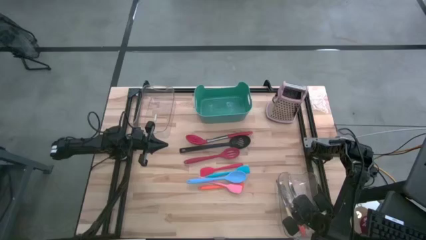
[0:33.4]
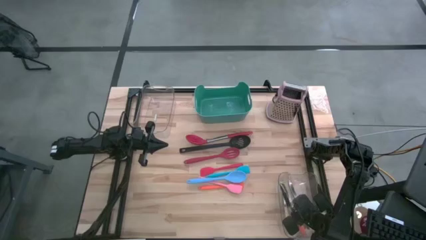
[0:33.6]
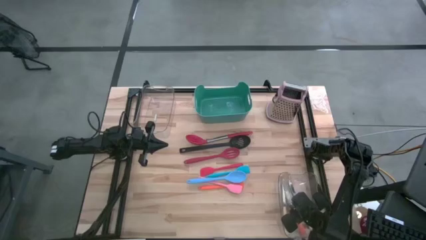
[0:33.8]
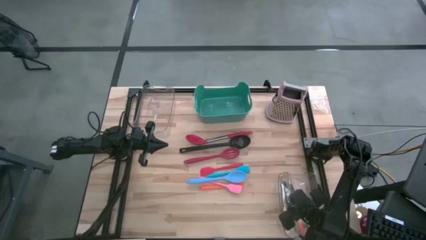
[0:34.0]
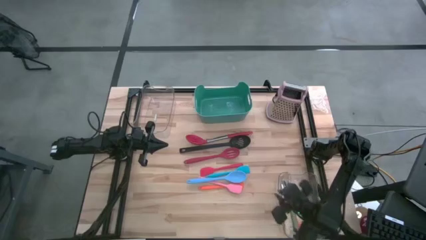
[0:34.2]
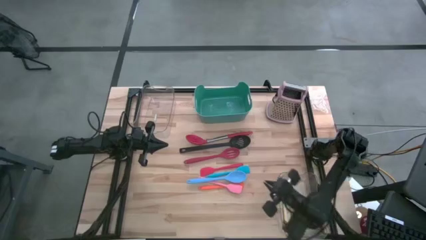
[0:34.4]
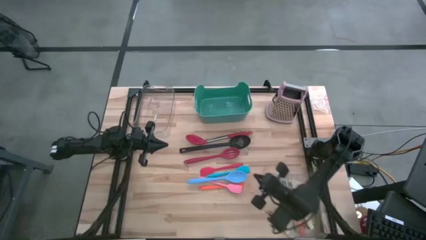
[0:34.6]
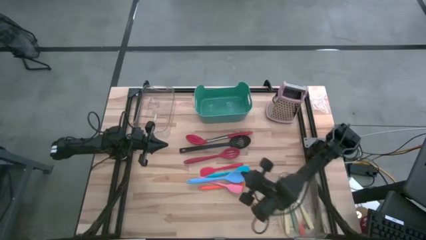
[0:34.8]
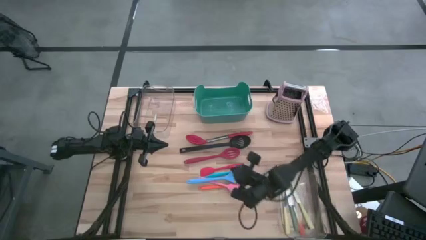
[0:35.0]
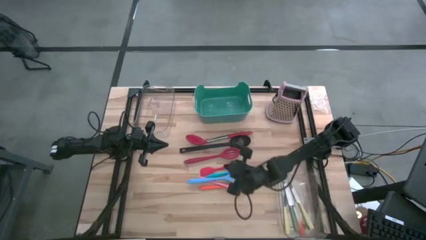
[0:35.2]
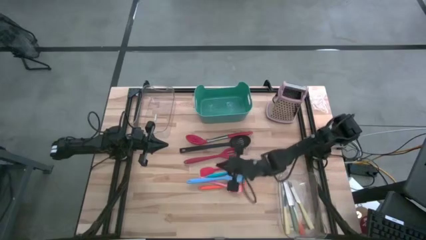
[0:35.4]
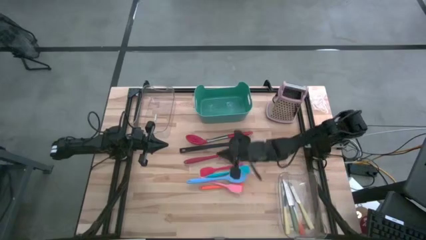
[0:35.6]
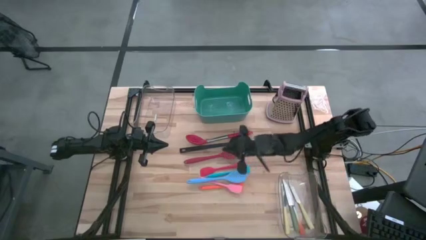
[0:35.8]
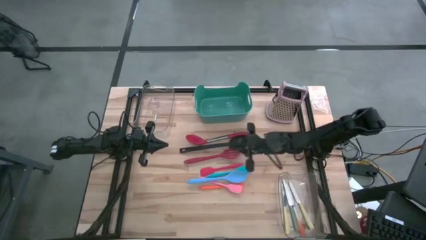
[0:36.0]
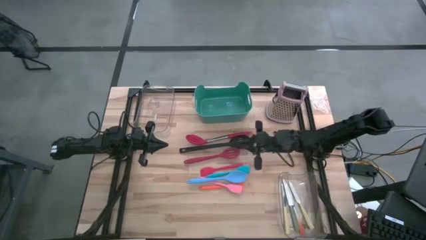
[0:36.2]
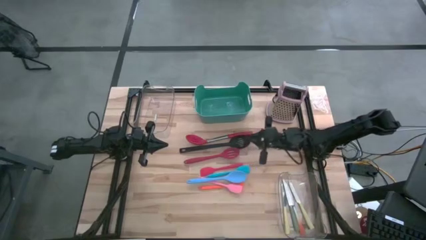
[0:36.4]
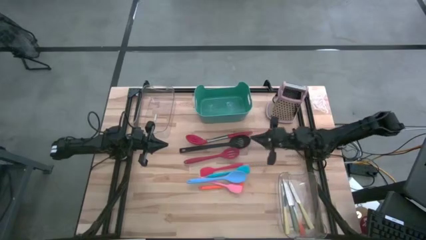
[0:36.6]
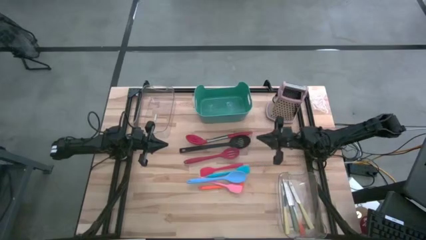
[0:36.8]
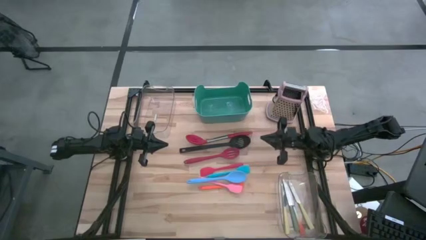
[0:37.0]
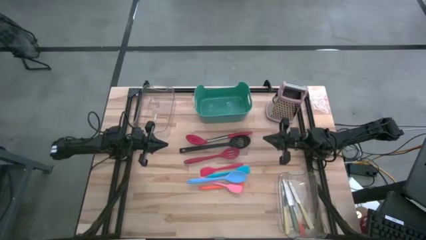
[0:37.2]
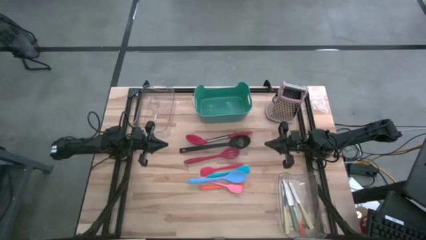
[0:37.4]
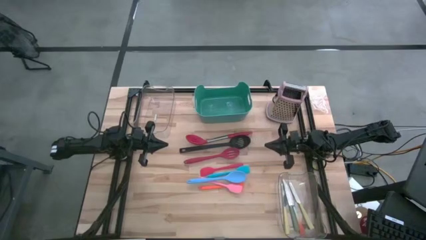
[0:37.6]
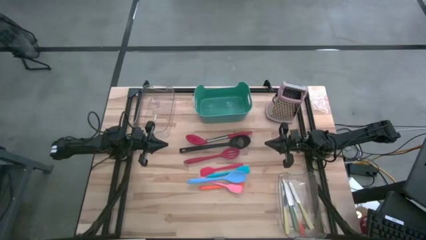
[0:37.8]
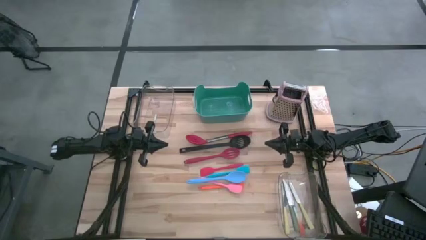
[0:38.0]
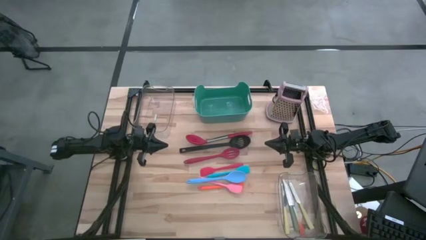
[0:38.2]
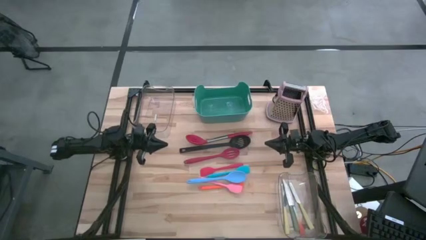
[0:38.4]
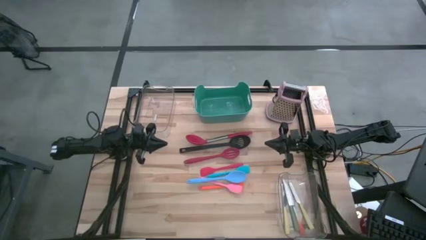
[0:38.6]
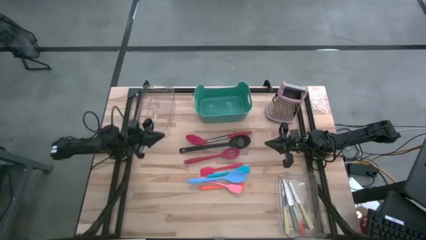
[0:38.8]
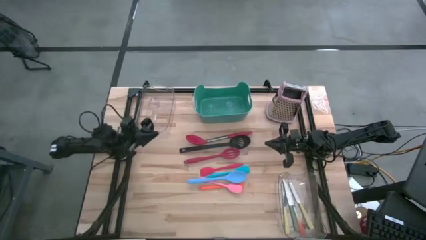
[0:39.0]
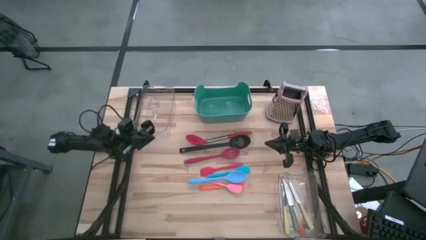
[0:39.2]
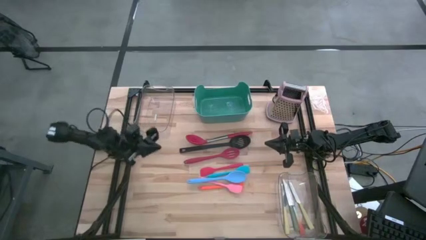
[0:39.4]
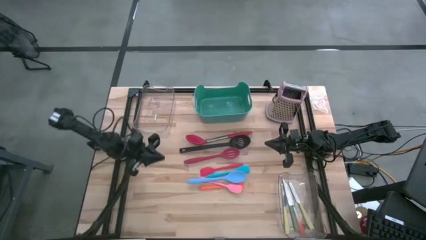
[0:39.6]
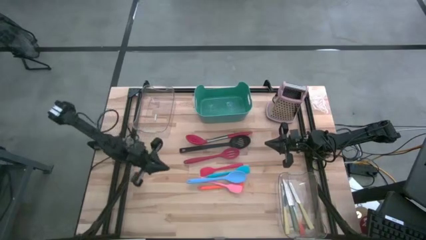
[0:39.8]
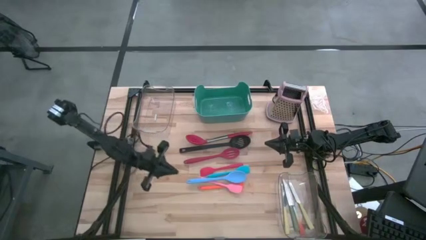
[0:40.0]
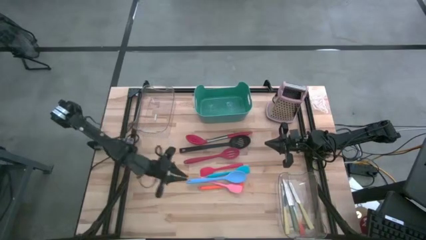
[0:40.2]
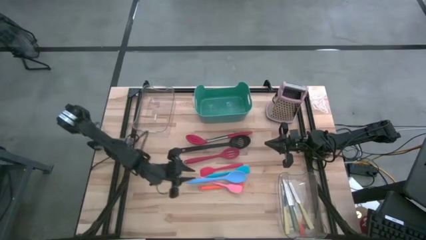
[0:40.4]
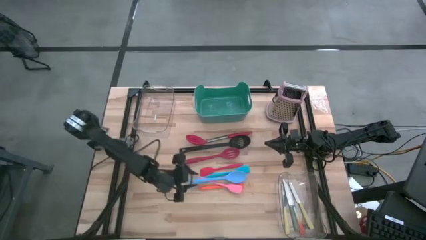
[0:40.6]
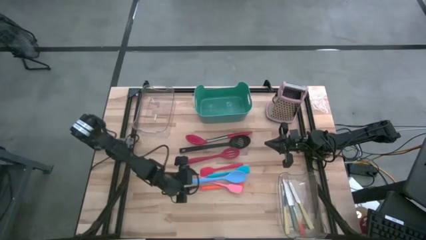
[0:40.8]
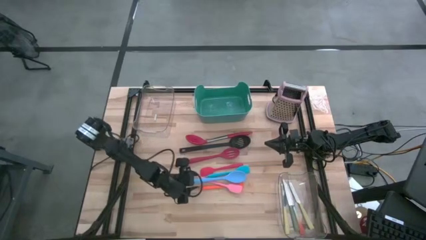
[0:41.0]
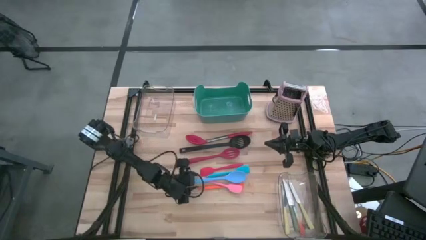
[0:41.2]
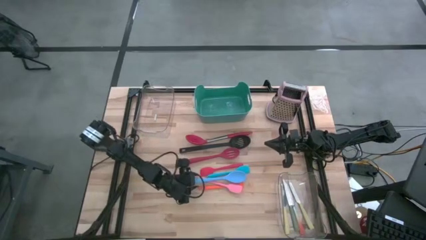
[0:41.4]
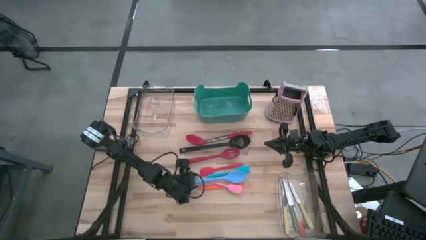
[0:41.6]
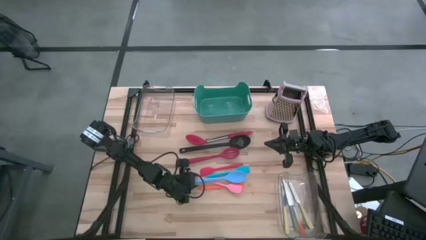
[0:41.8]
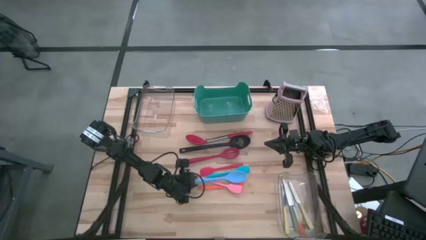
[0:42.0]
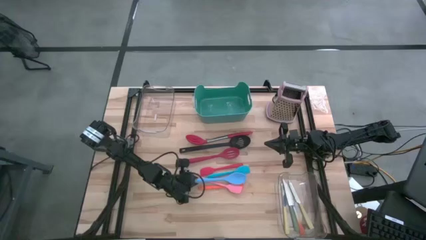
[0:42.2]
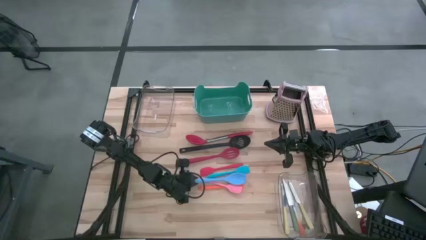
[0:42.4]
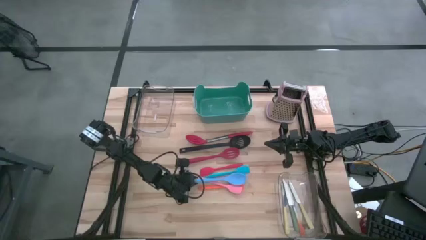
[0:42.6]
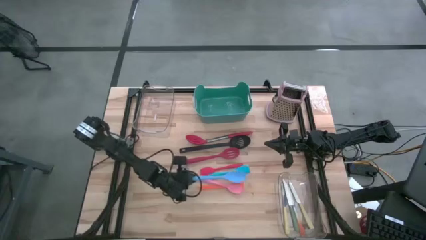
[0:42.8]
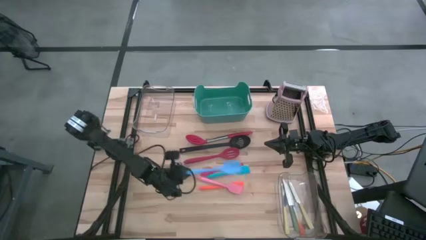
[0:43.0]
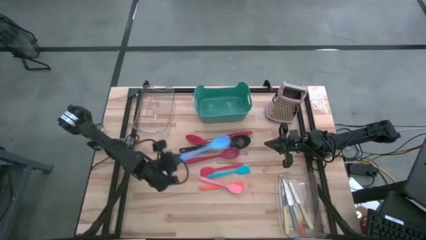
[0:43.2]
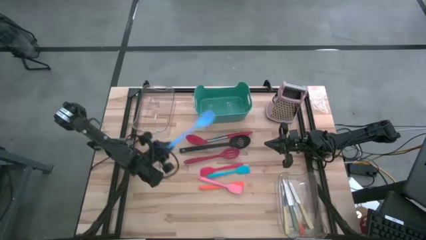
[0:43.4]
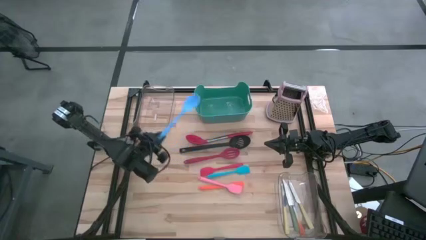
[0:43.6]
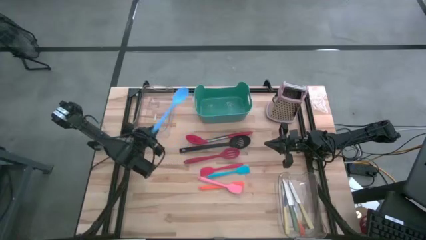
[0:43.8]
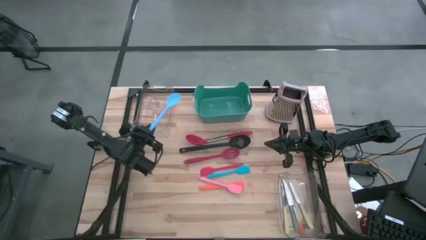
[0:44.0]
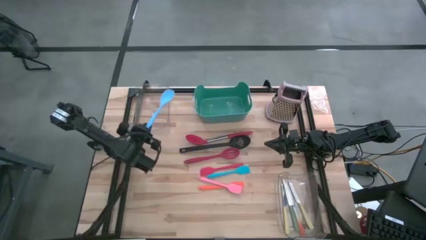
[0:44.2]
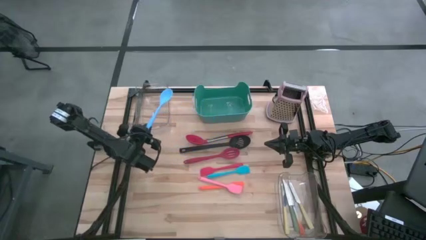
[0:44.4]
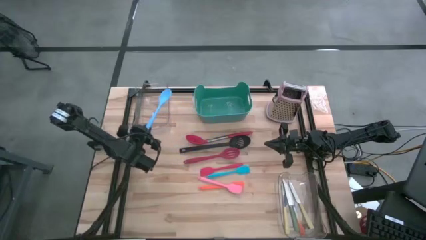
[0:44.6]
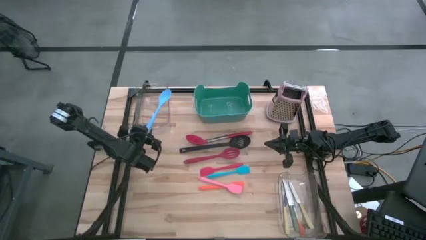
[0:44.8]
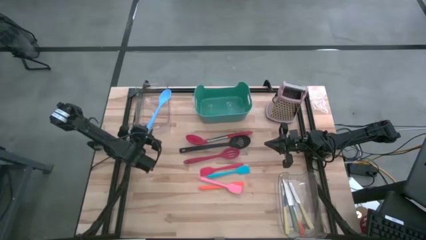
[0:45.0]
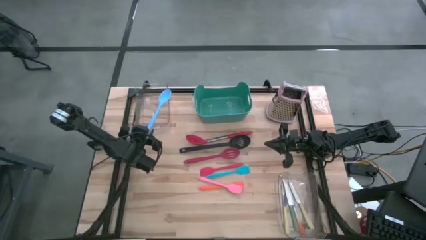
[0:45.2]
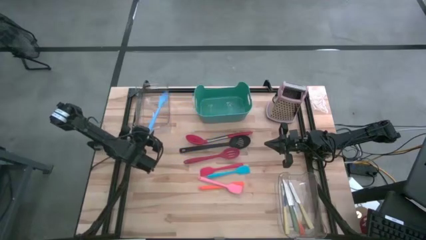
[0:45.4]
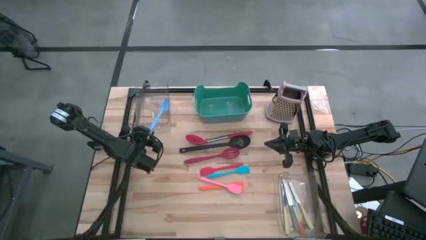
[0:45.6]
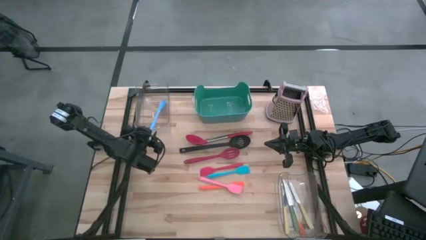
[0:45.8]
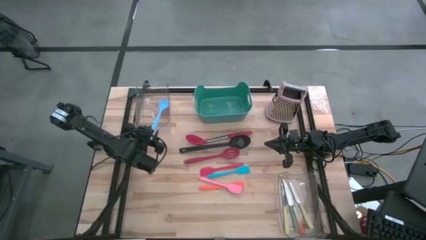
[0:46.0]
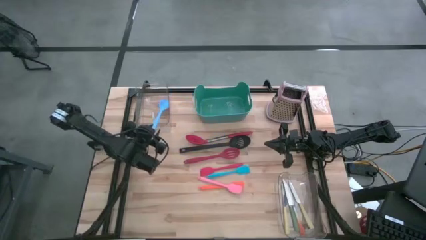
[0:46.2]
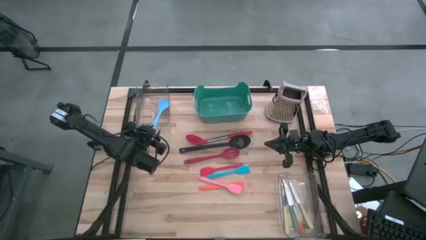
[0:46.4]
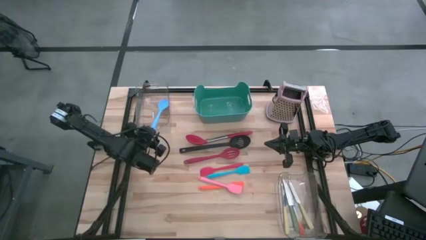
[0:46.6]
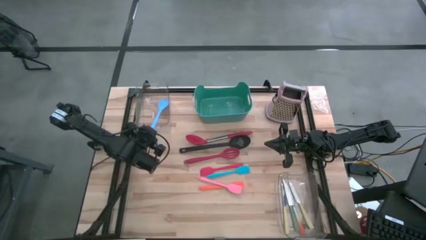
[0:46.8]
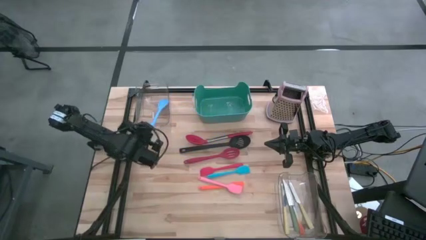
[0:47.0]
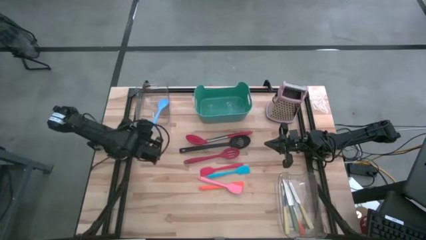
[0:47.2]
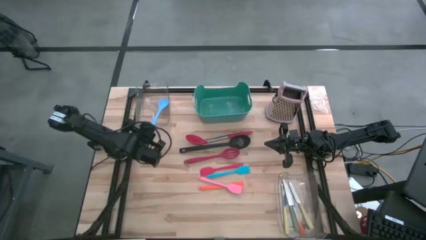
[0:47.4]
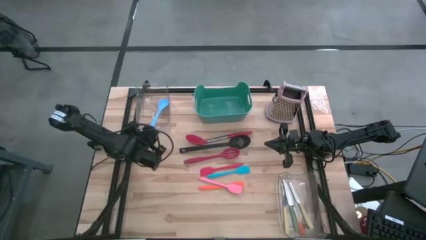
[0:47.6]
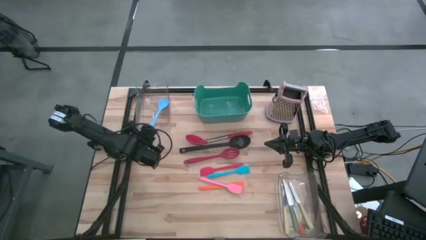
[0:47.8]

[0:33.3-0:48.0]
Task: Pick & Place Kitchen Items
Put the blue serving spoon into the top transparent bin

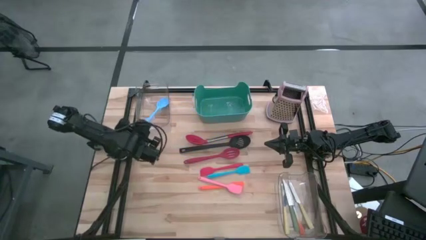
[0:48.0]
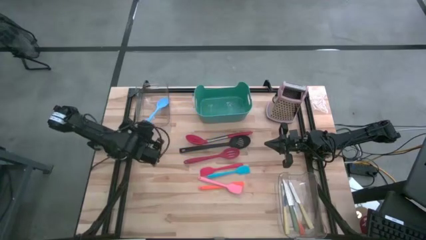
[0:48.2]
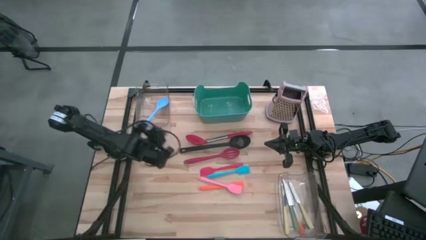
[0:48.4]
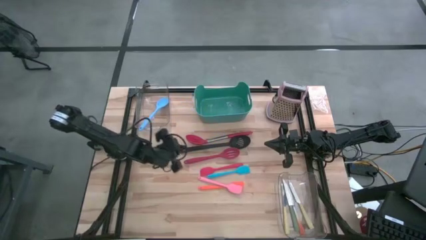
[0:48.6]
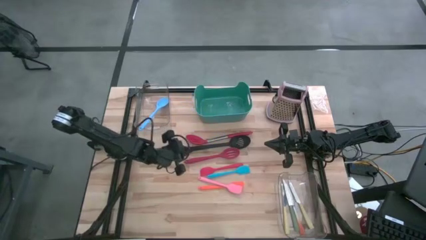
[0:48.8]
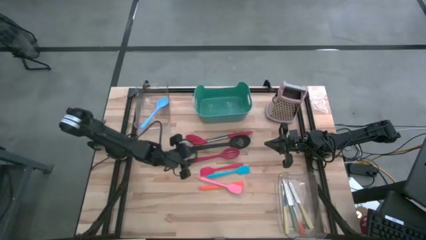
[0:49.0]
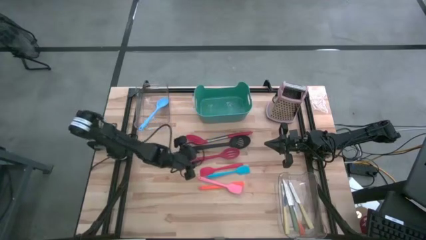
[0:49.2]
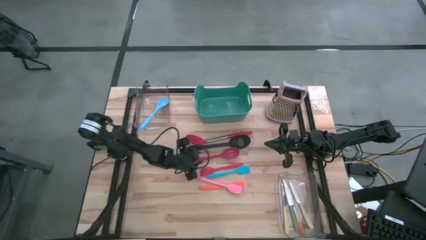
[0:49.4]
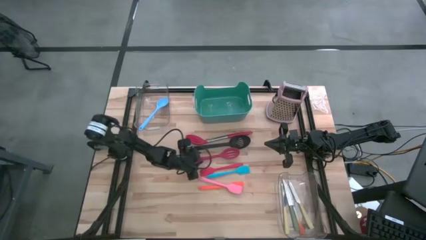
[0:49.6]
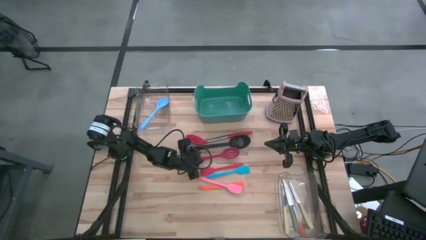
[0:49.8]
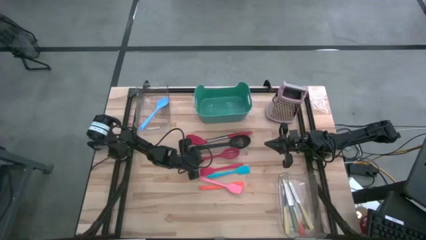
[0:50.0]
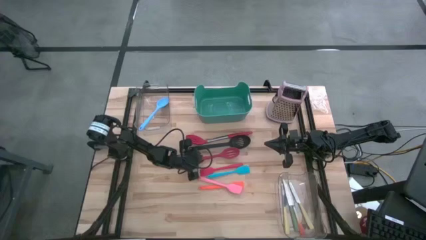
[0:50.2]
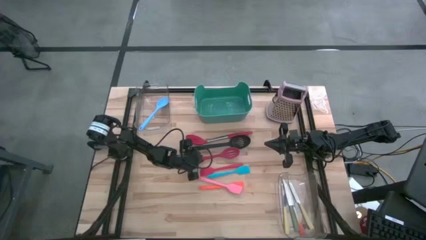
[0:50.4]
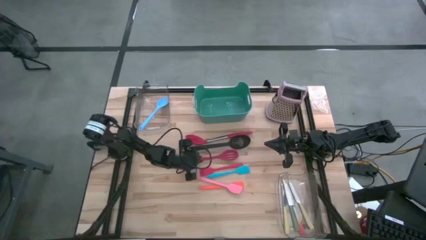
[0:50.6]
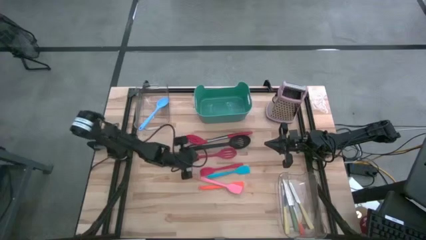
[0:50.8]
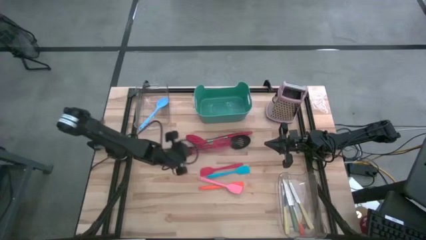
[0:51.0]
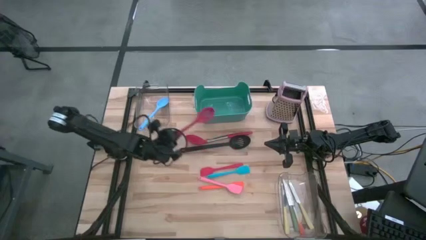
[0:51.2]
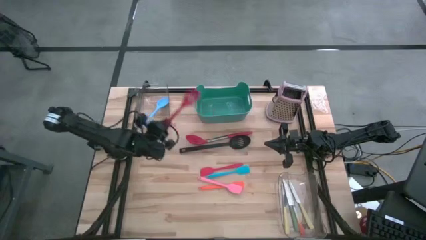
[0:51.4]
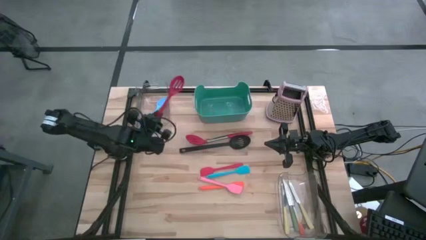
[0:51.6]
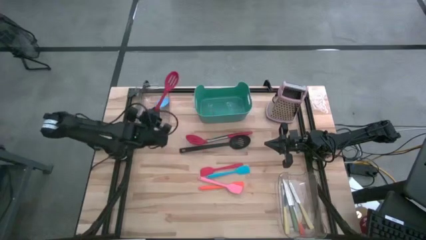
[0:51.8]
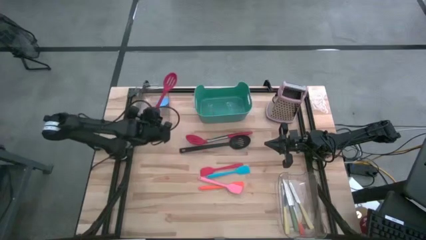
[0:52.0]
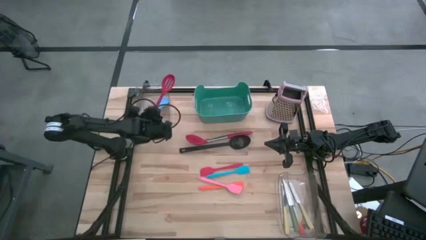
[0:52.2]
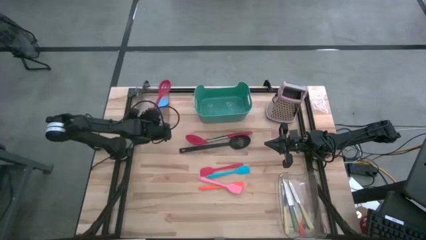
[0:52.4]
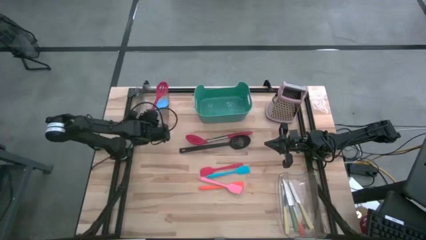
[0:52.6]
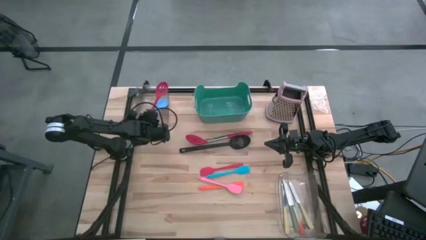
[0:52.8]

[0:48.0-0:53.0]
Put the dark red slotted spoon into the top transparent bin
